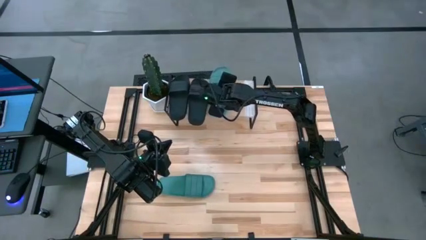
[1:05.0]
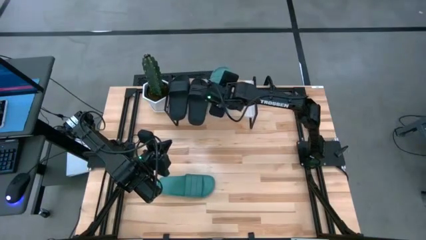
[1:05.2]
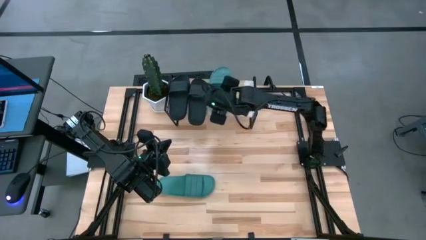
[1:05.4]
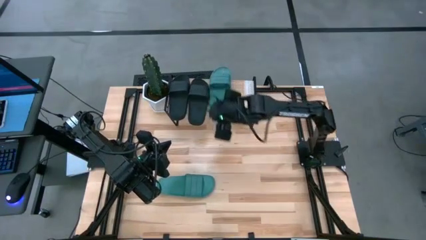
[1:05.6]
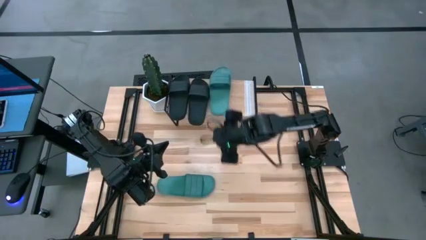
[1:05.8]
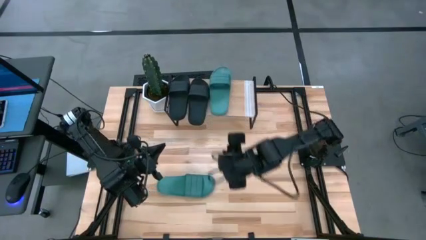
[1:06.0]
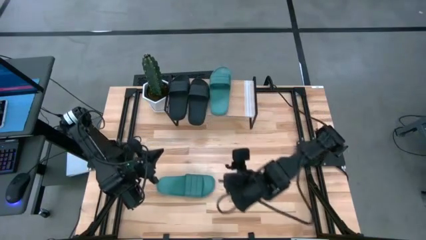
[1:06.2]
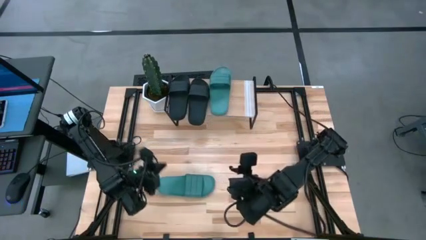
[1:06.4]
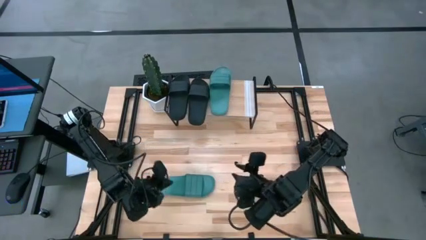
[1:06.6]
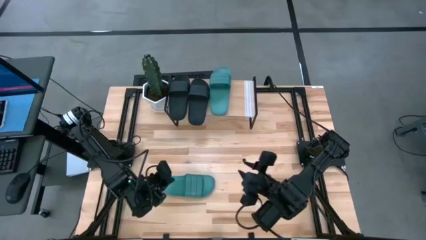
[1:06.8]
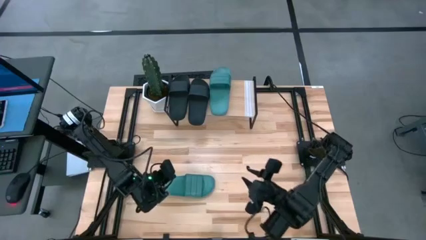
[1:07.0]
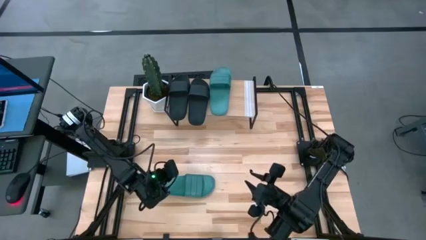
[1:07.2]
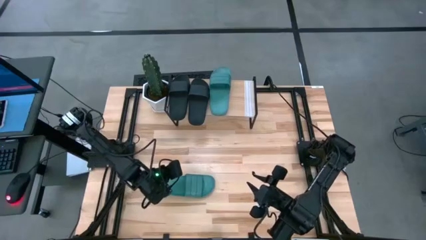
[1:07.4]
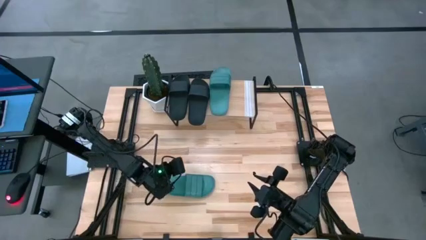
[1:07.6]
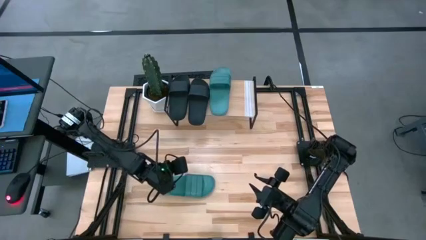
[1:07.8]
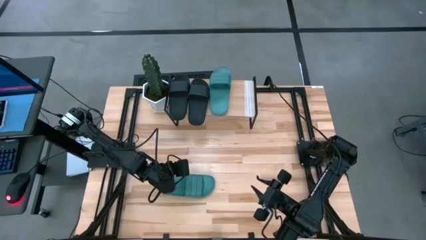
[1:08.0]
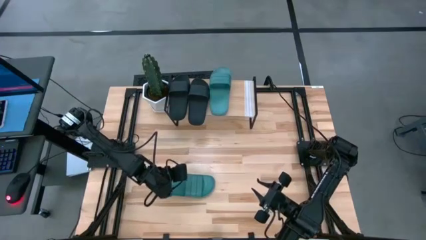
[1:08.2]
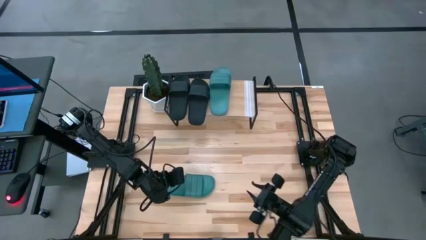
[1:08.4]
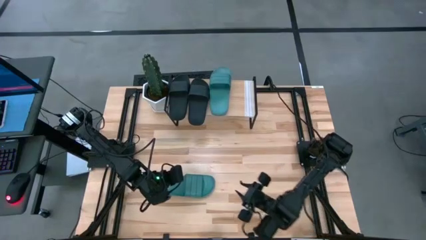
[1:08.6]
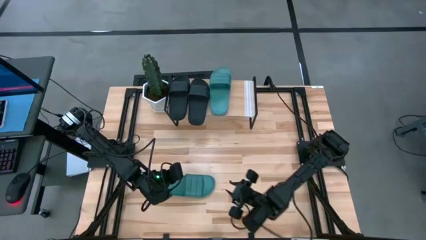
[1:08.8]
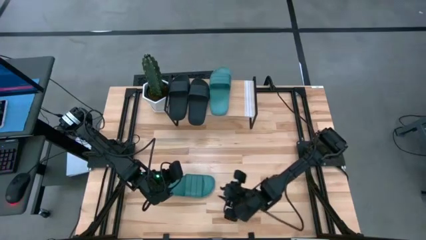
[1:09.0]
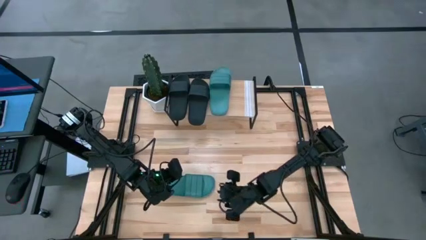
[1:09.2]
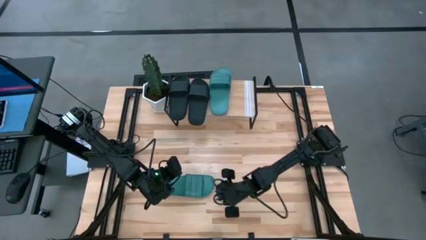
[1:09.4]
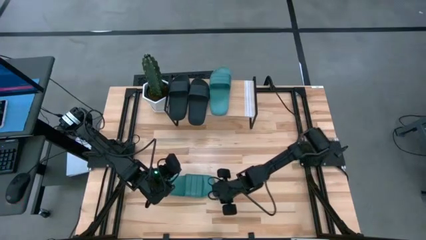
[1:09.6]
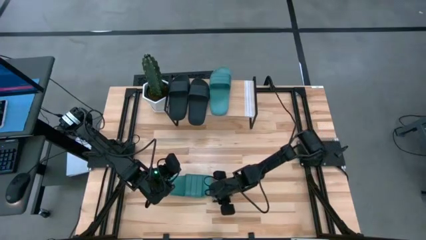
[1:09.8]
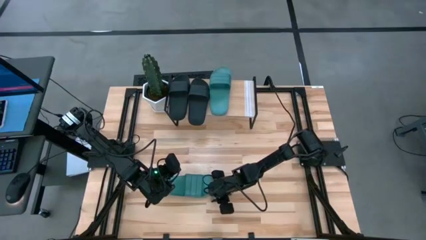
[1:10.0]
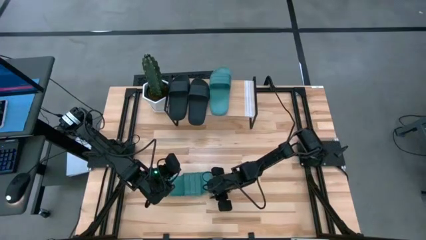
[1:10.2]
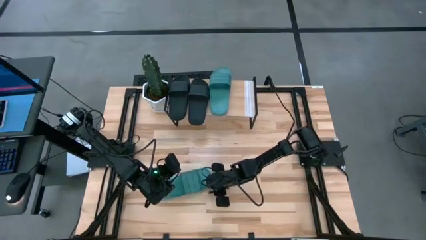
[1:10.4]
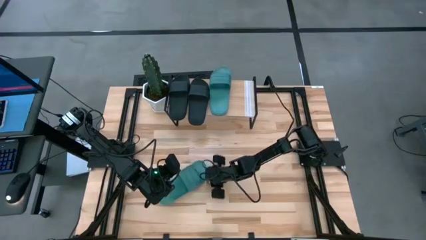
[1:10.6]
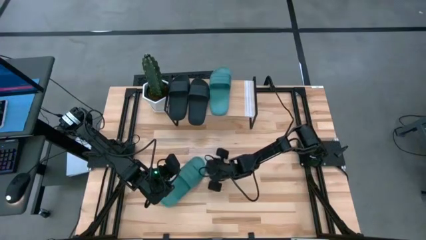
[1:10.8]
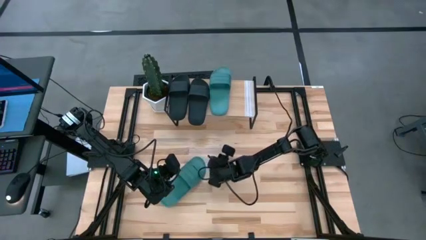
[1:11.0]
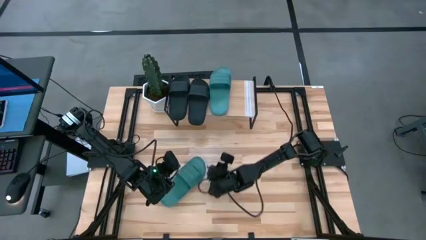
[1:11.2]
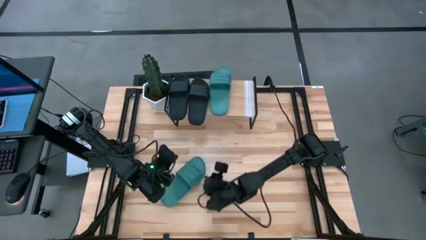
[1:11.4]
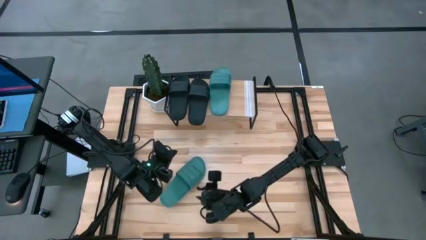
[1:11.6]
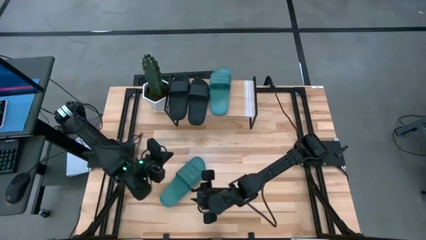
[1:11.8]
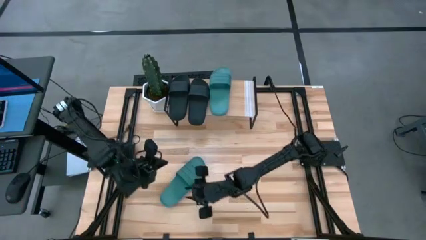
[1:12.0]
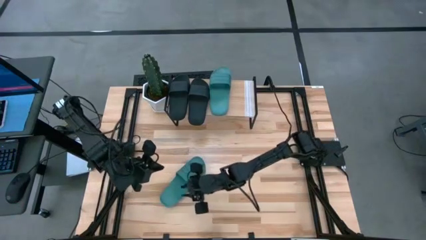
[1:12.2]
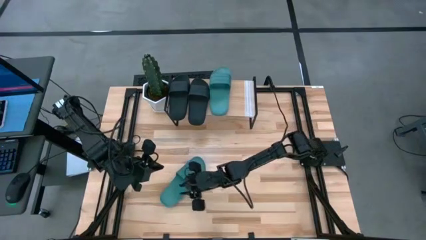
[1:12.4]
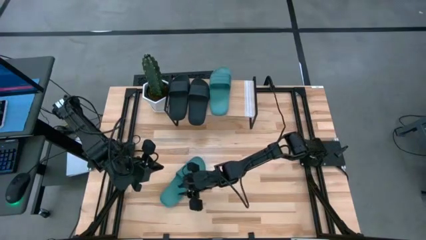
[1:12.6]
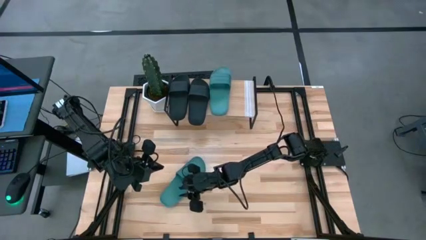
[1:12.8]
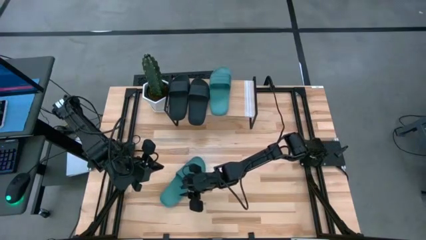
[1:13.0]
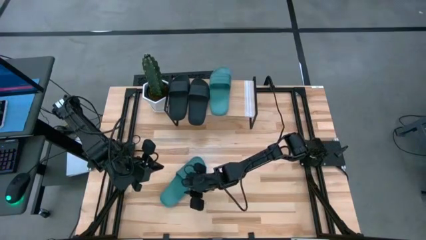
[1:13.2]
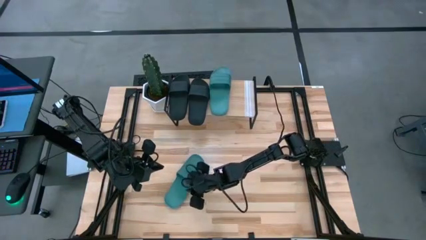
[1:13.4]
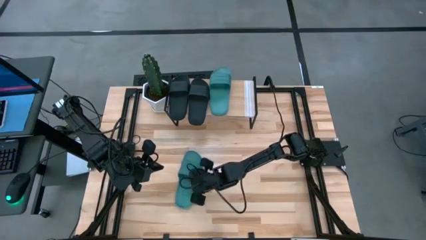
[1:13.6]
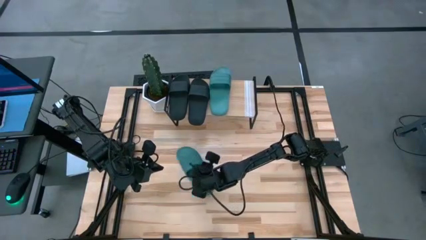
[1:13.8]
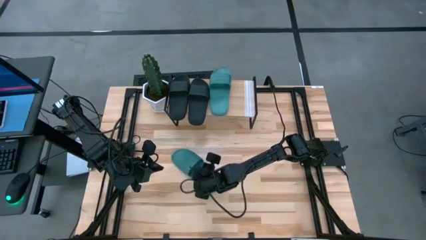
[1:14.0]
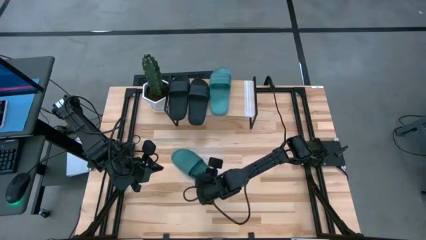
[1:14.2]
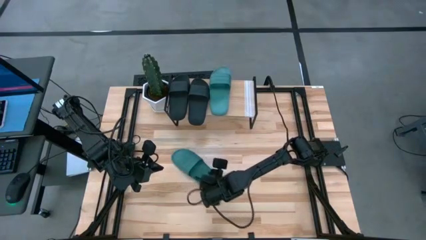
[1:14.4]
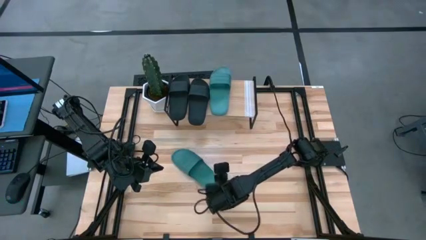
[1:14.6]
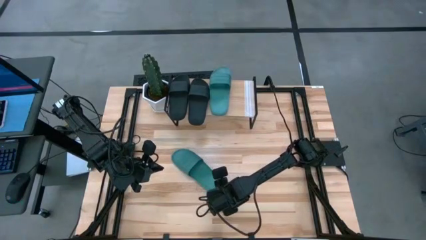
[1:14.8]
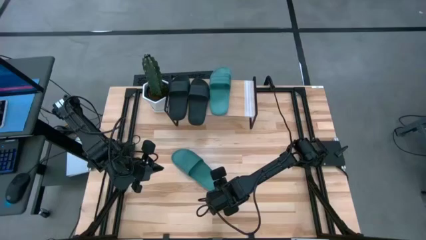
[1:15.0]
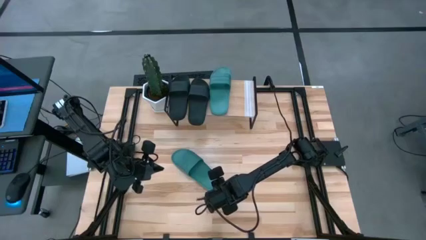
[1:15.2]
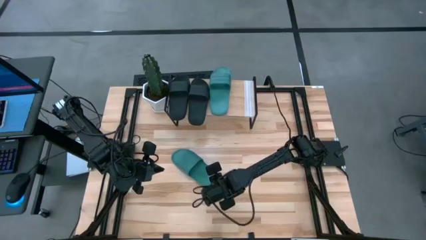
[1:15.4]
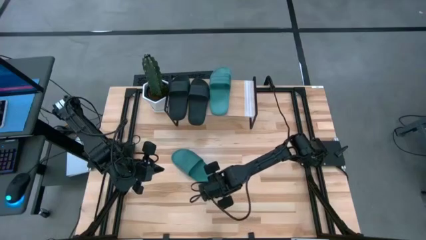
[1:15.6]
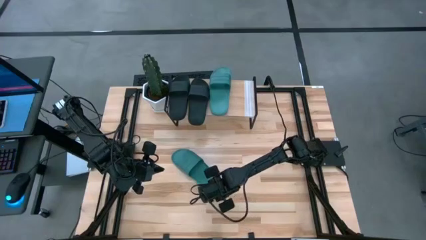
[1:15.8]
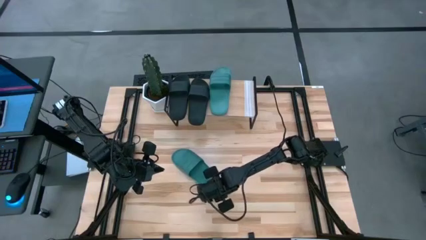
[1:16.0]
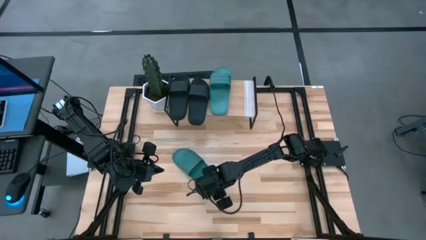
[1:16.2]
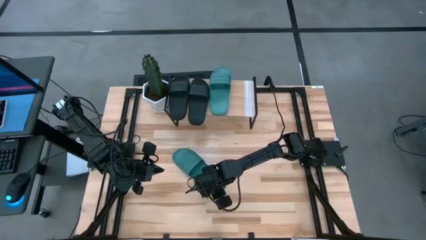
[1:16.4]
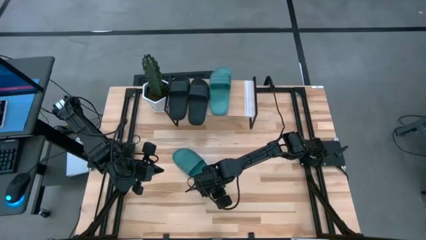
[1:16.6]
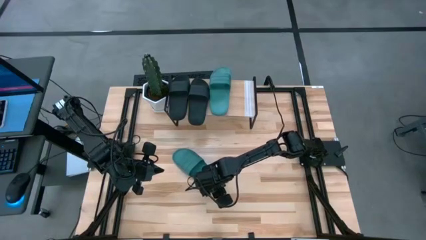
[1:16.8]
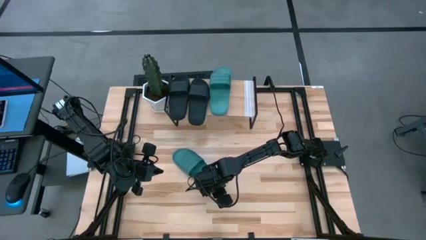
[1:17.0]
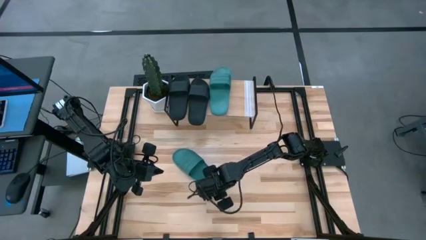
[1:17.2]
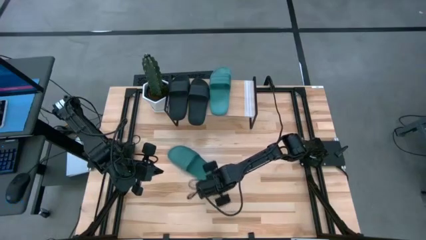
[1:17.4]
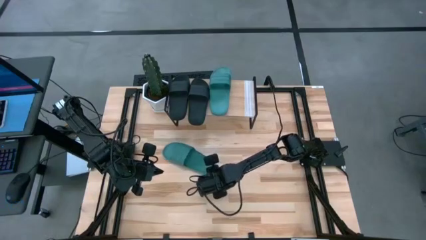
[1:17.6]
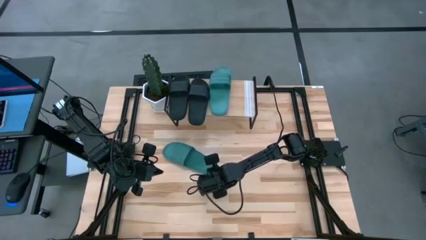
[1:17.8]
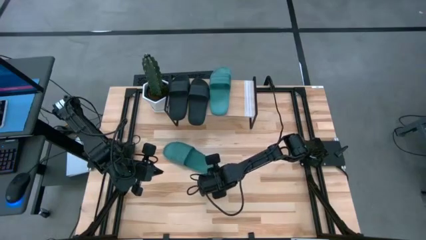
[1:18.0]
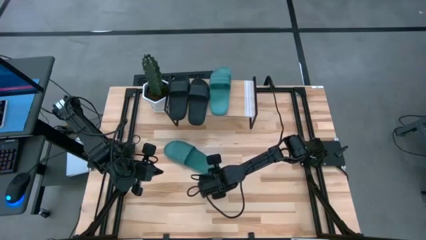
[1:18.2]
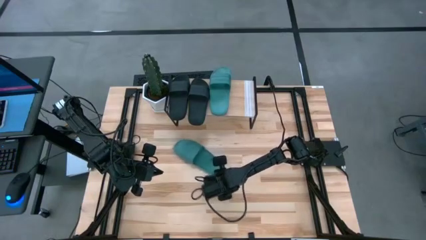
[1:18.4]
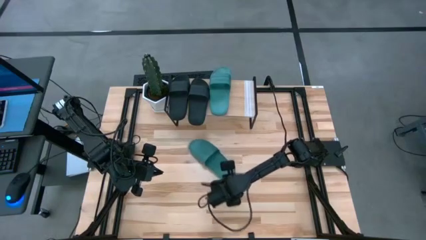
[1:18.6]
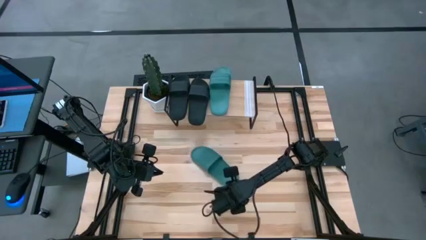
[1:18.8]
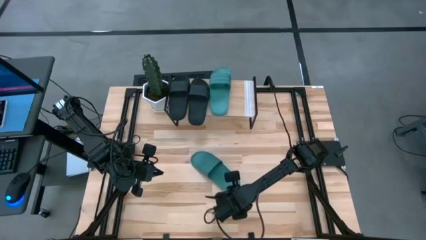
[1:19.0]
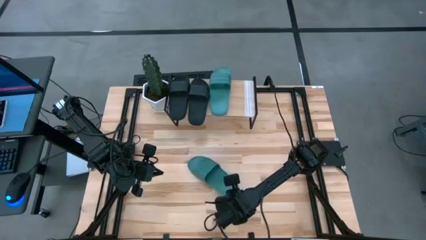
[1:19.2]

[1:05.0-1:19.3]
Task: Pick and place slides into the shelf
Put the green slide on the shelf

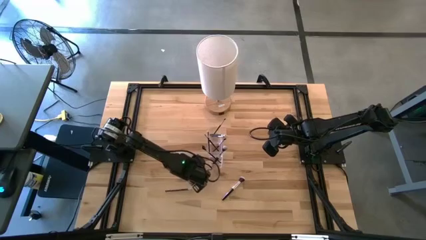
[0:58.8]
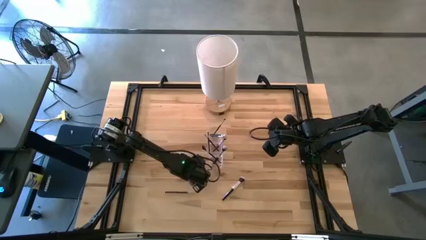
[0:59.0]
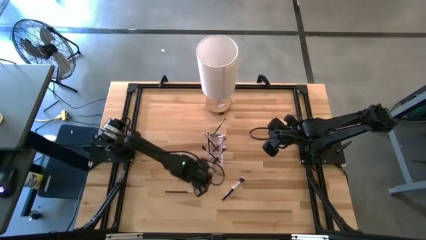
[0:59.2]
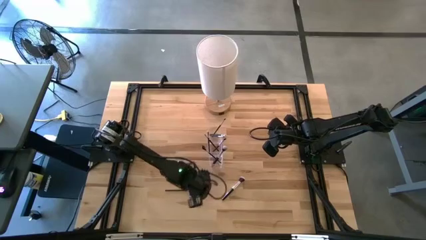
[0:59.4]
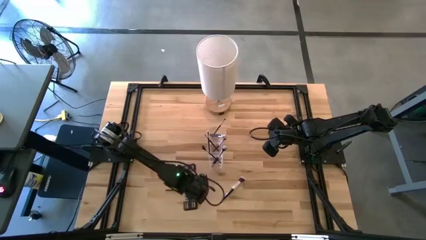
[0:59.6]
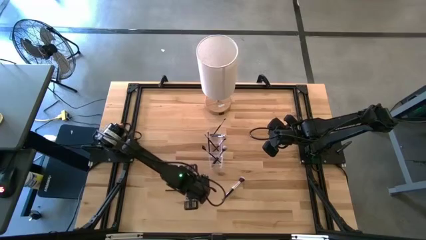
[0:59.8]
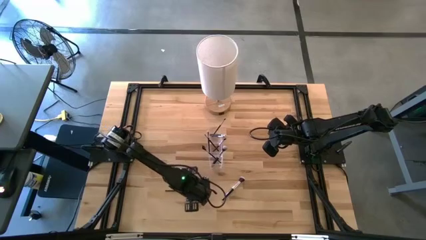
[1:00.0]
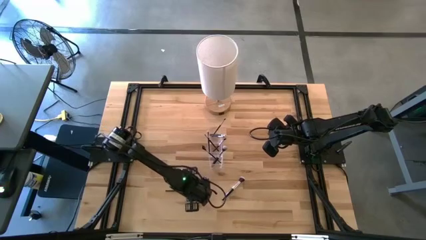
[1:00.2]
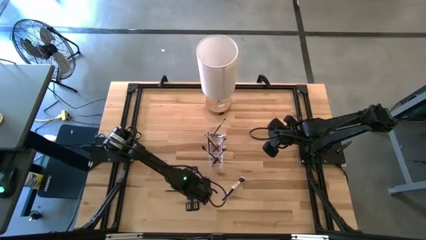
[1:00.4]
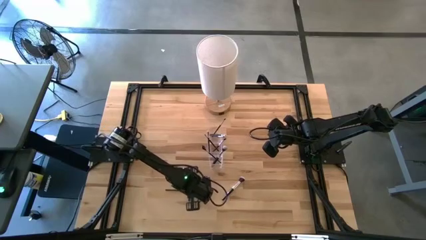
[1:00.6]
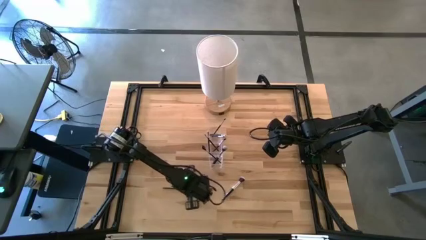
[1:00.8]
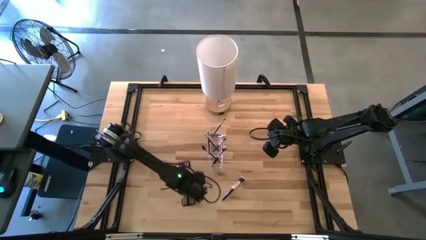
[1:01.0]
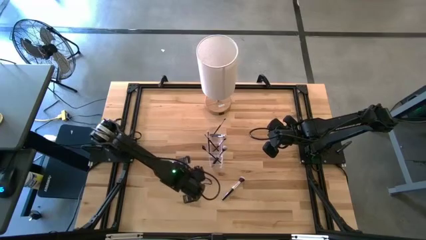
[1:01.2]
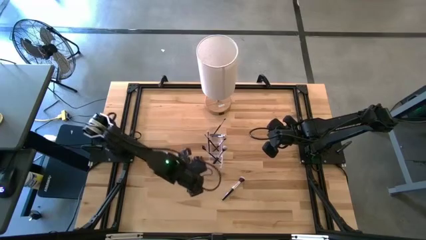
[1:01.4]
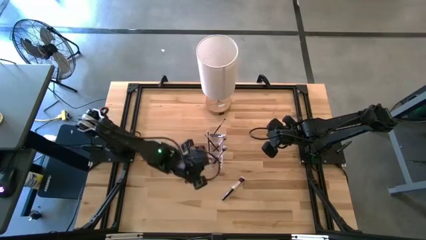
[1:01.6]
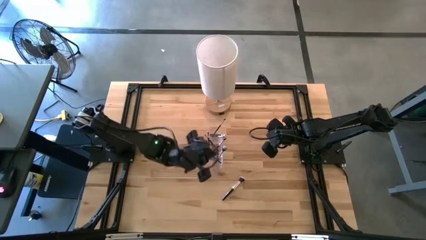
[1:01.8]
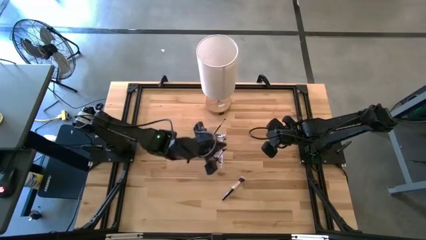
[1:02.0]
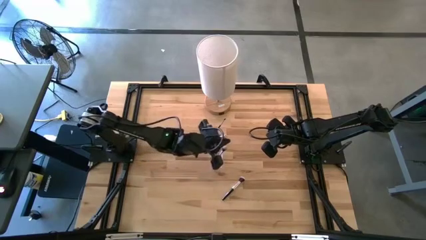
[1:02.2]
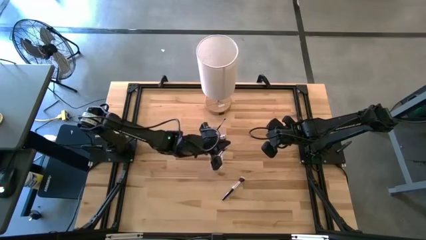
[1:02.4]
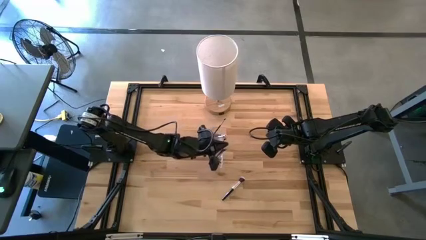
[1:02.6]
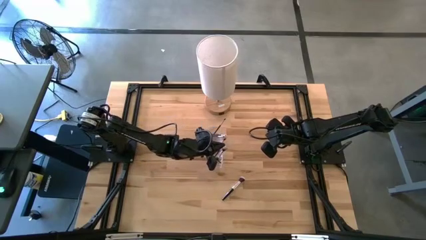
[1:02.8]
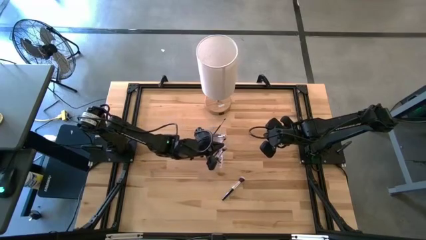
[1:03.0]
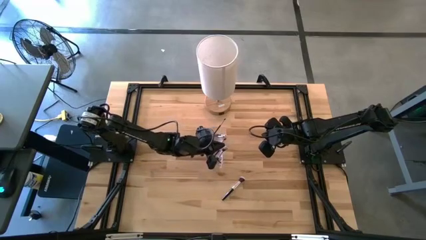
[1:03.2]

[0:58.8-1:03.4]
Task: Put items in baskets/containers
Put the black eyeshadow brush into the transparent organizer
